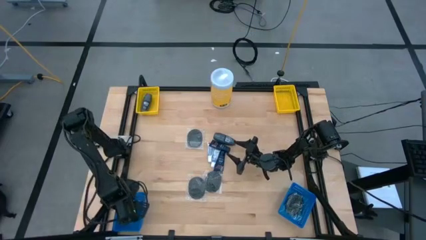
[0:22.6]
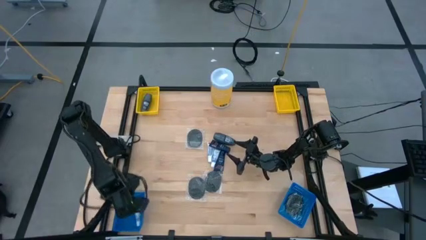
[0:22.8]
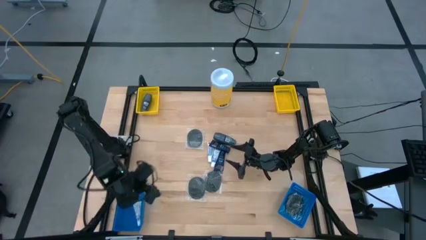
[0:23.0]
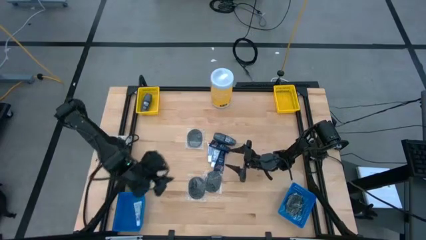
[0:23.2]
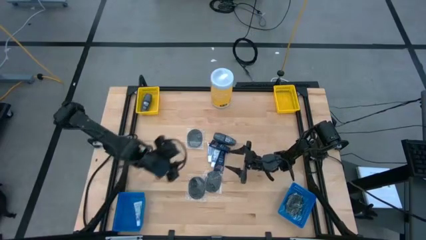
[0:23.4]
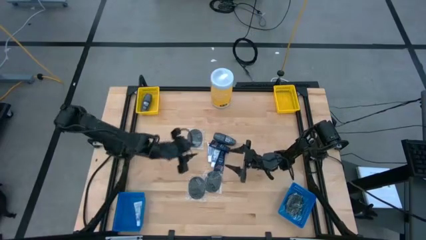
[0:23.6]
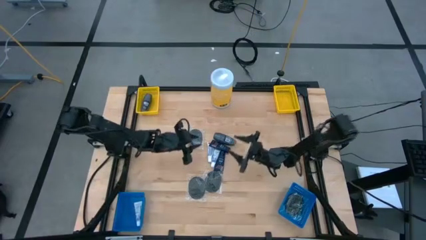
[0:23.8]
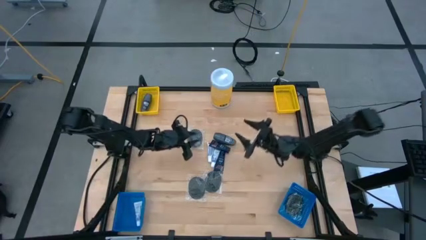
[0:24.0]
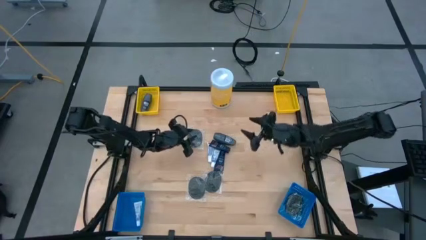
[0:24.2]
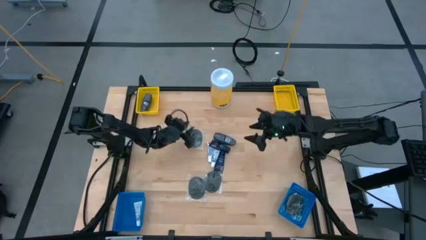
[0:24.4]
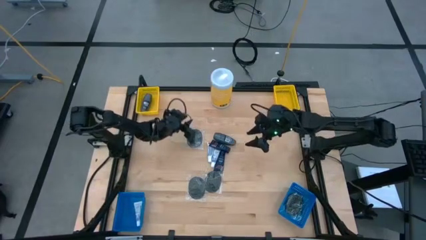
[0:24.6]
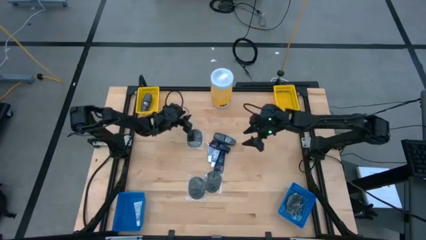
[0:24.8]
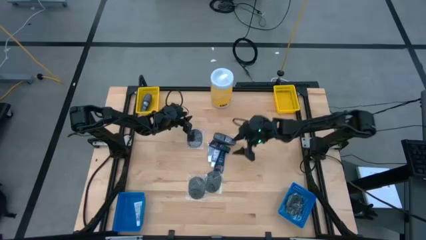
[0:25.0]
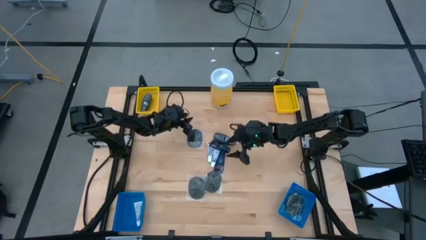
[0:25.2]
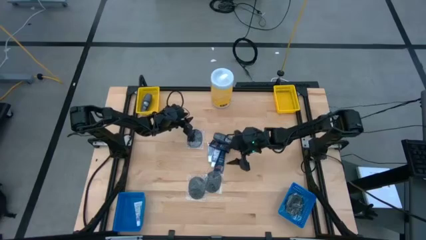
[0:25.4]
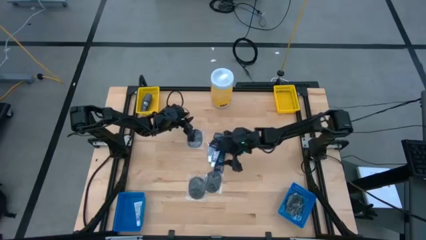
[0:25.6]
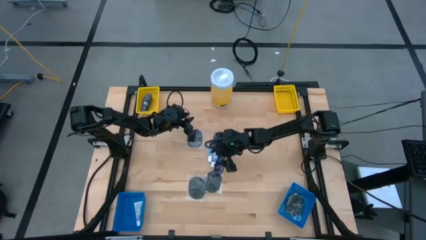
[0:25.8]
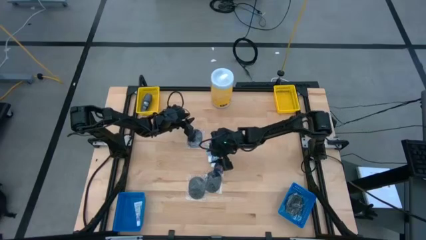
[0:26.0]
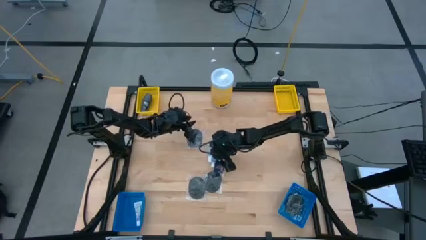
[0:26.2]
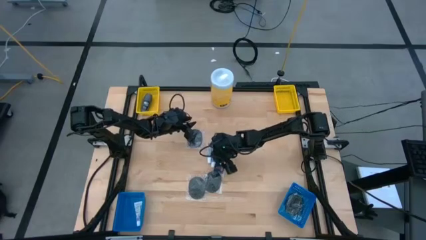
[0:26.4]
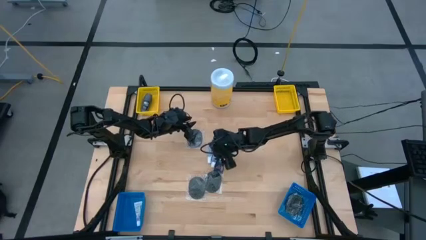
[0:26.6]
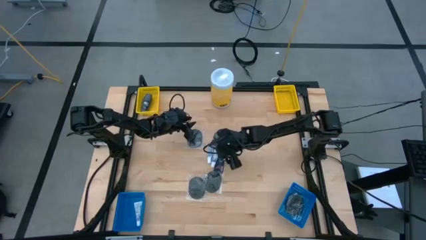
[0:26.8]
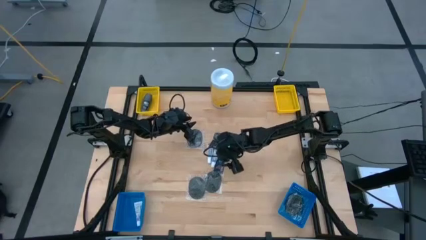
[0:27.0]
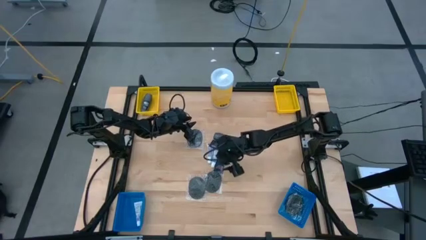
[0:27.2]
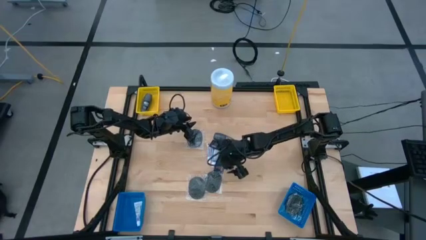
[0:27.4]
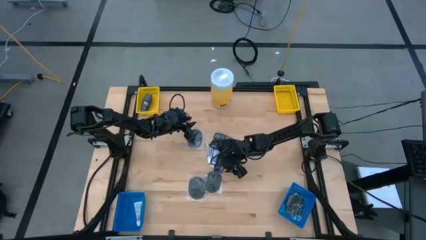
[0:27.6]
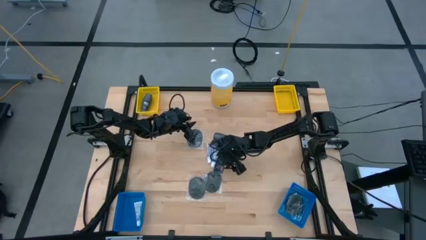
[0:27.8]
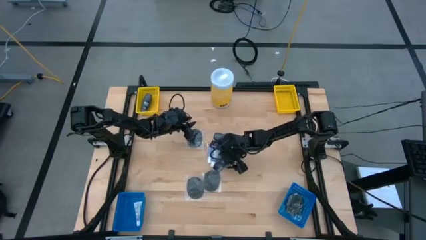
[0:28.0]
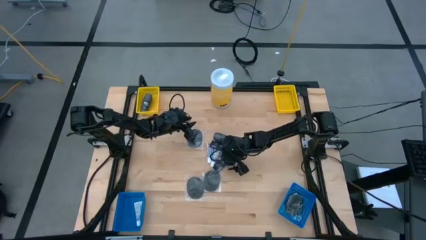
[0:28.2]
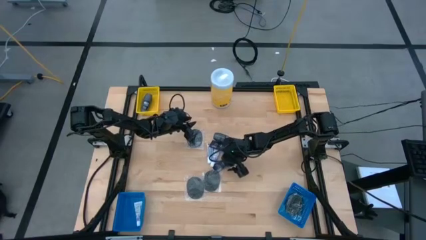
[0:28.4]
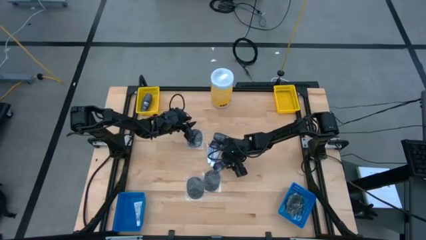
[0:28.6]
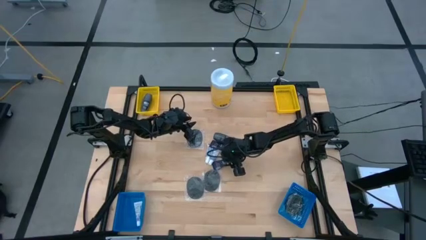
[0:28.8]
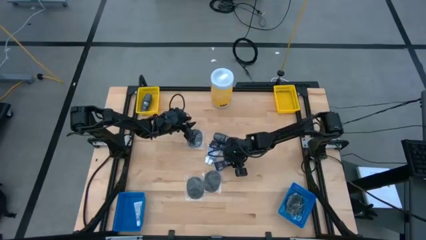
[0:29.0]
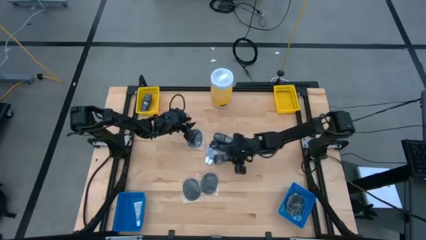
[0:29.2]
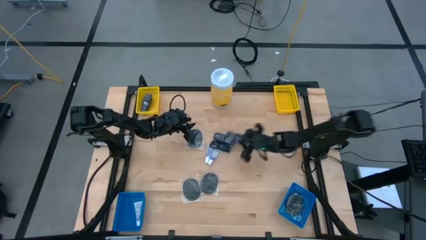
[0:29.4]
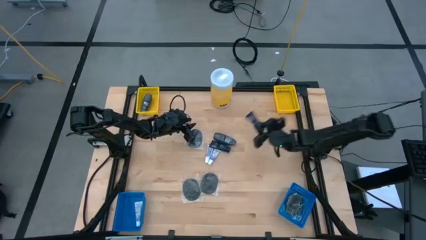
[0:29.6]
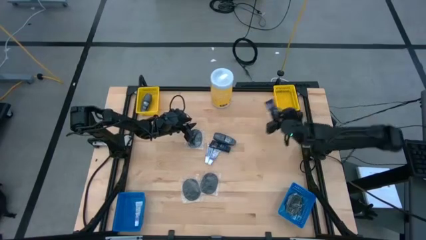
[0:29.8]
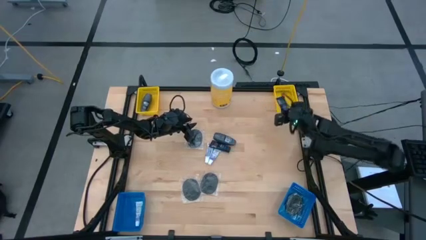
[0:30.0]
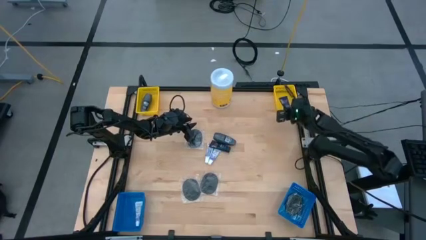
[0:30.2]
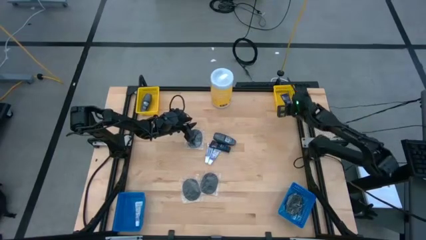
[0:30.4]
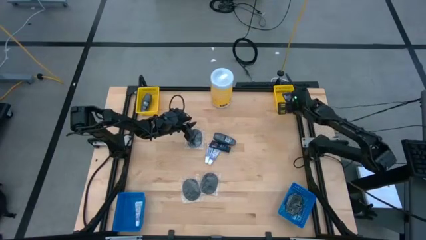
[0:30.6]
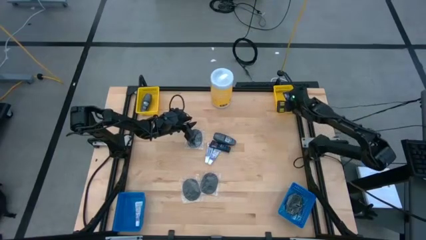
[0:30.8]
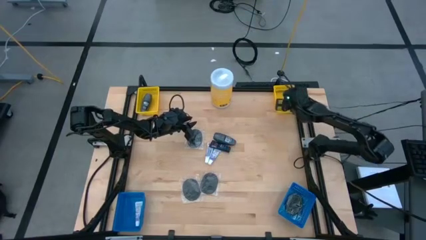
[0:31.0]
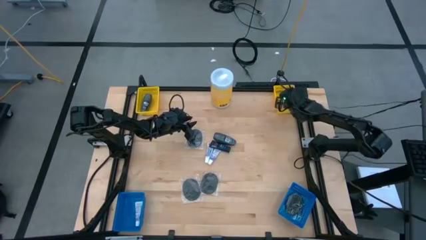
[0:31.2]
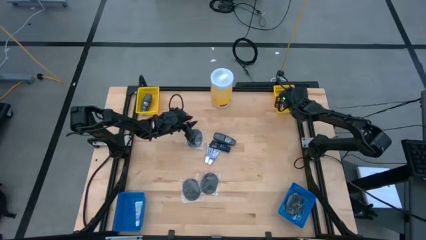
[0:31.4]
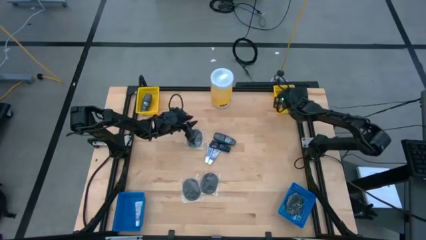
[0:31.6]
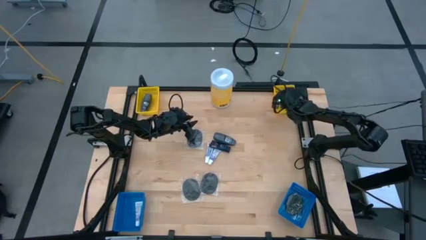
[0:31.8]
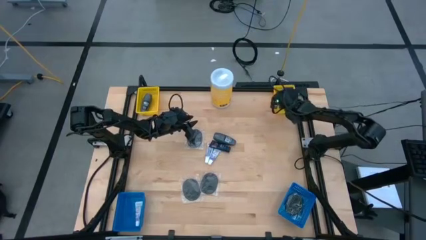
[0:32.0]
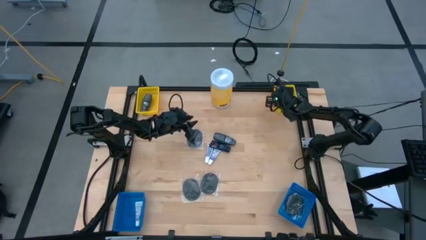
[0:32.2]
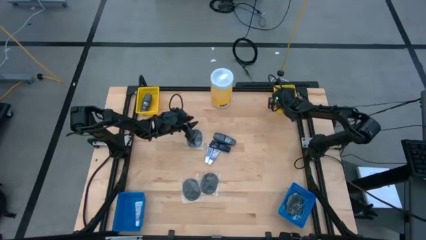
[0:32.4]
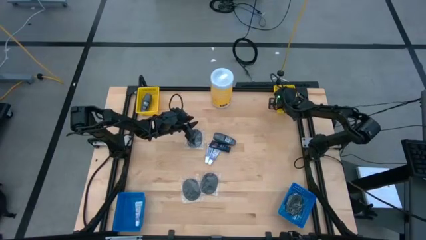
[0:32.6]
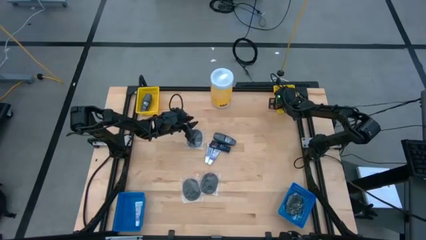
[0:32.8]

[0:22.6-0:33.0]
Task: Pick & Place Travel size toiletries
Put the blue shaving cream into the right yellow bin

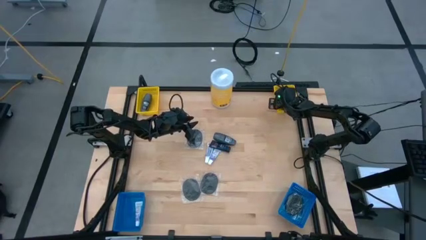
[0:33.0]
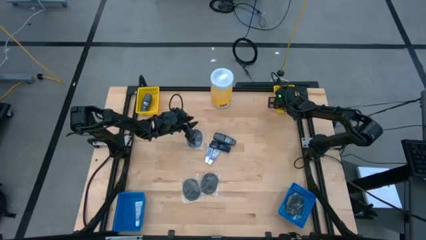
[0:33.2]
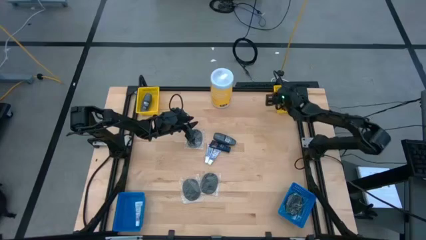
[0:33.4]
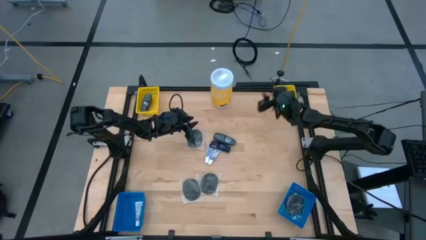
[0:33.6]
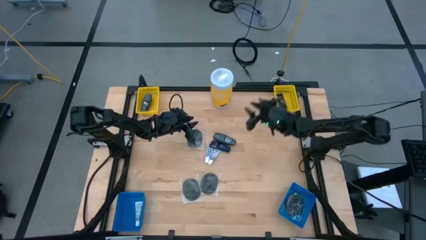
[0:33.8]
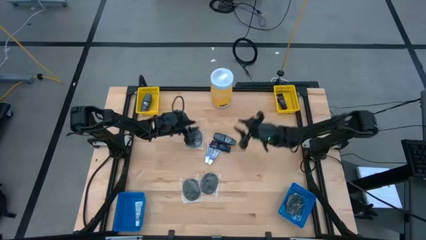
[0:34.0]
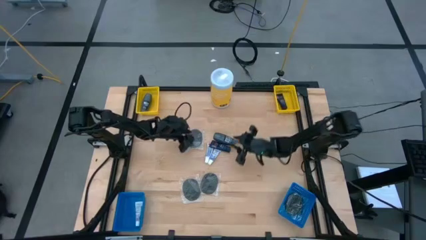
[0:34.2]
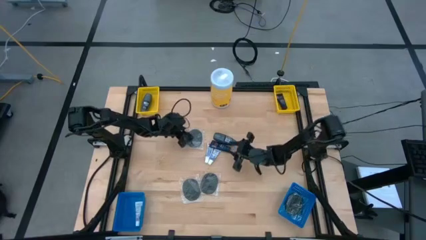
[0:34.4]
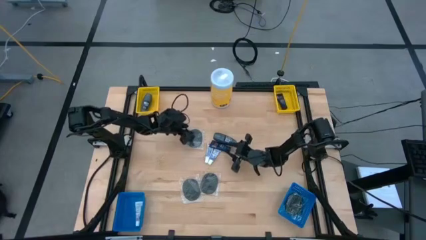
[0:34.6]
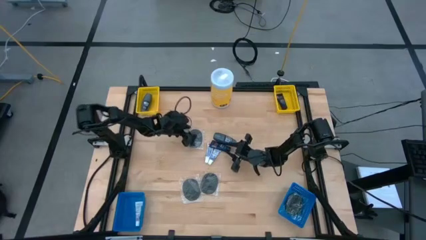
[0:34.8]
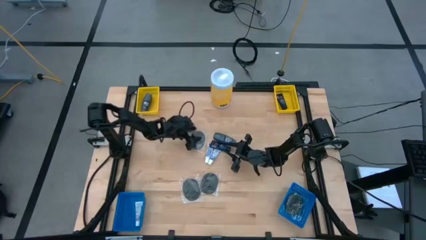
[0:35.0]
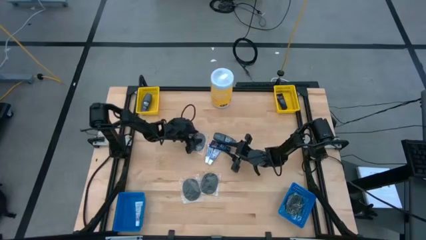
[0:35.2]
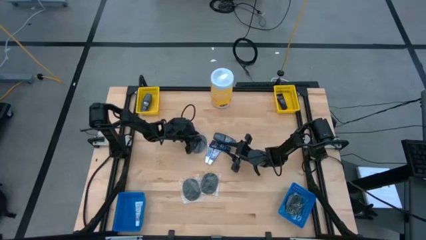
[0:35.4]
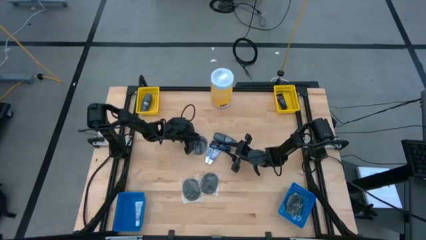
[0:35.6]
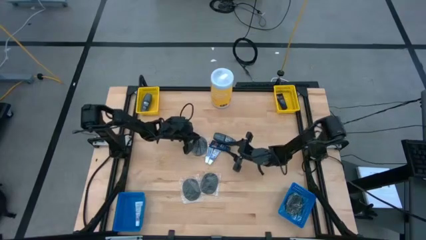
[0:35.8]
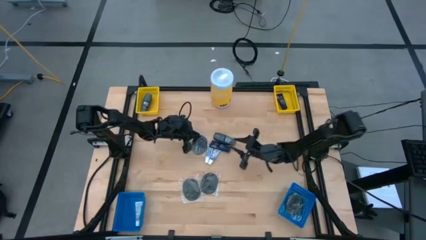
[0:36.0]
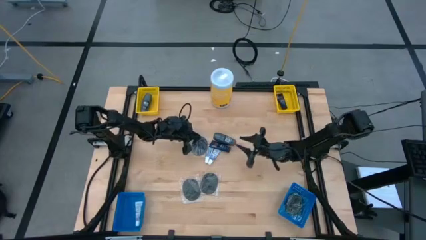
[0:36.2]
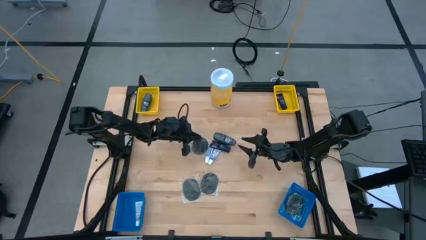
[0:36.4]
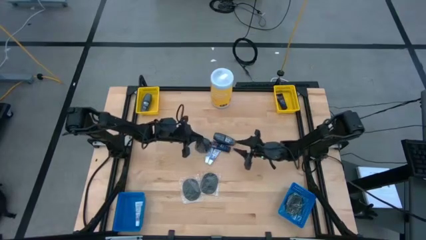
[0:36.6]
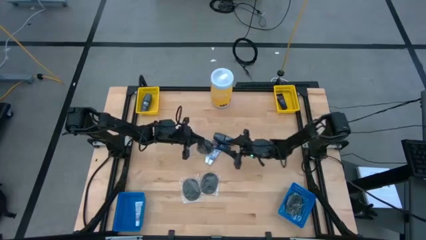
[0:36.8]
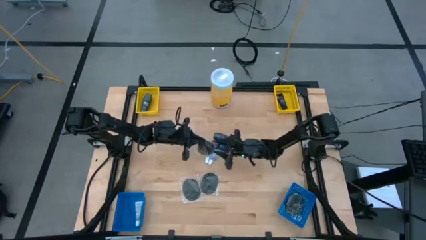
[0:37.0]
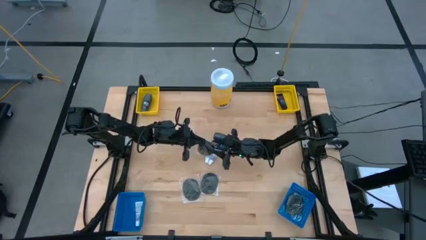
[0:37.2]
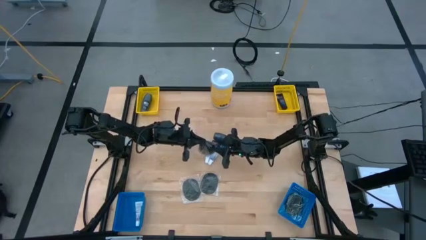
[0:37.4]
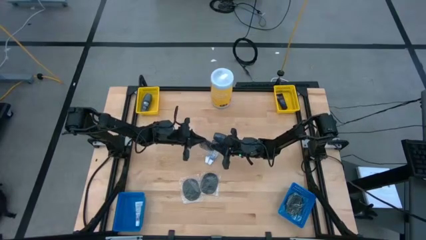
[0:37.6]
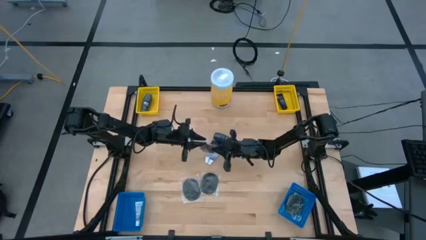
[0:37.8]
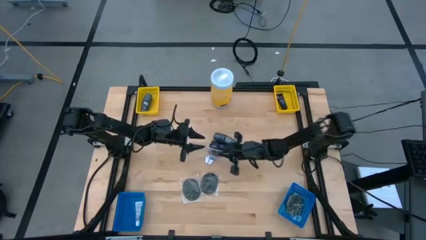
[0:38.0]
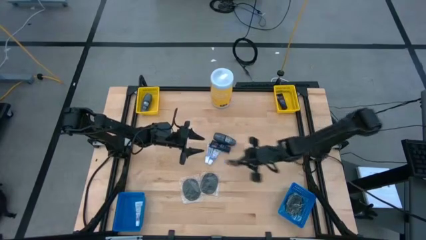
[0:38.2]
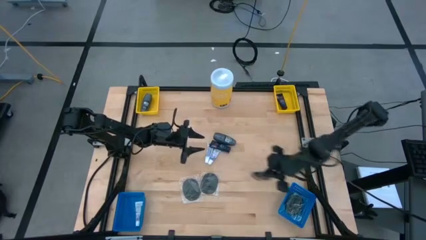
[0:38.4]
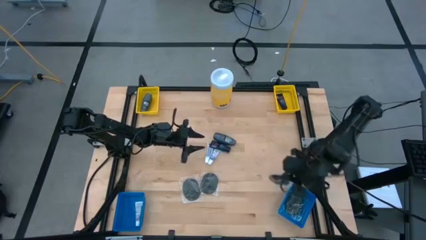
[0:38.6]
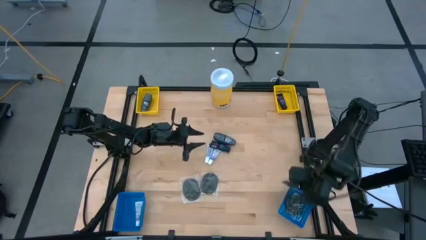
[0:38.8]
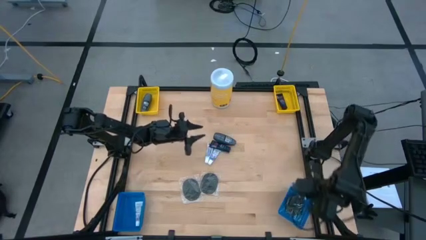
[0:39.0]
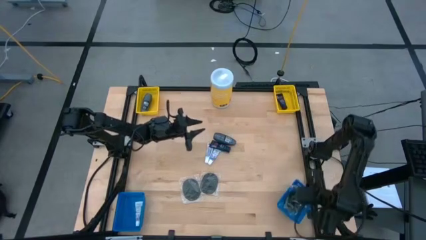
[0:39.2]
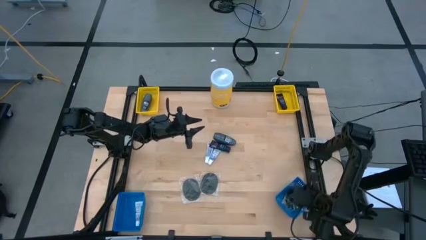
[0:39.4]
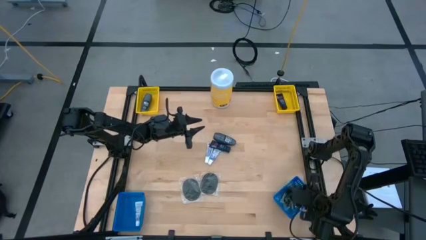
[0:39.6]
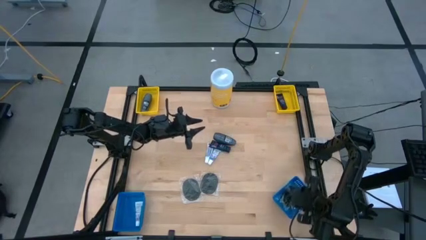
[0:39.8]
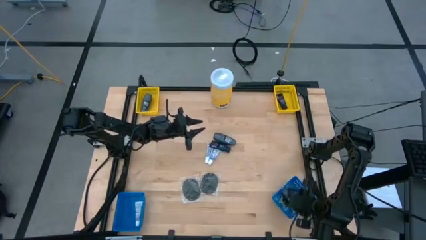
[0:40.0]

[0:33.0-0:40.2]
Put the black hairbrush into the right blue bin
